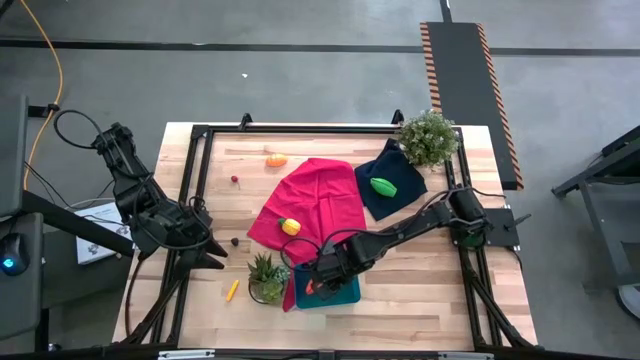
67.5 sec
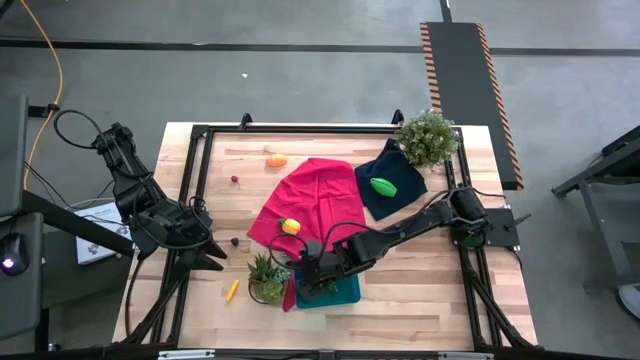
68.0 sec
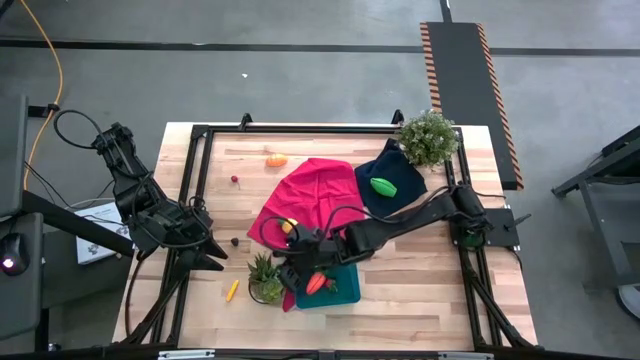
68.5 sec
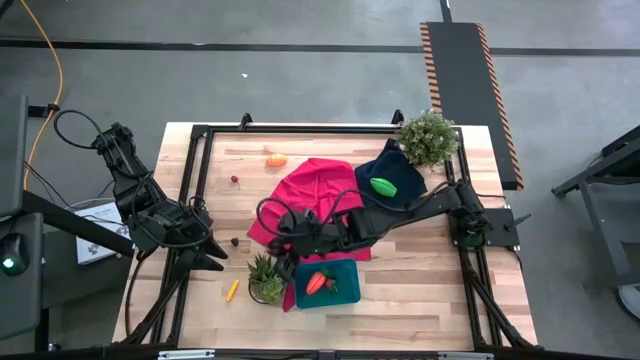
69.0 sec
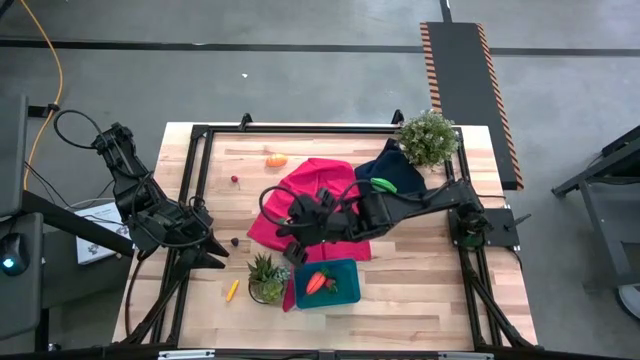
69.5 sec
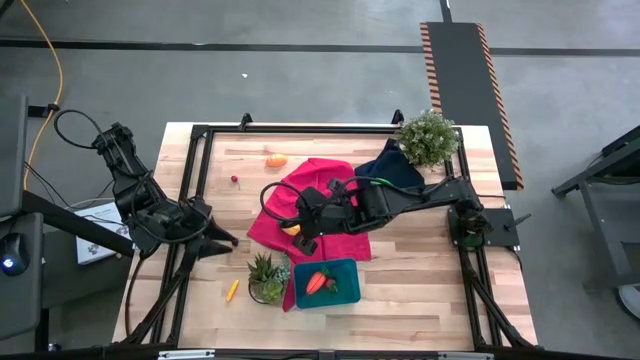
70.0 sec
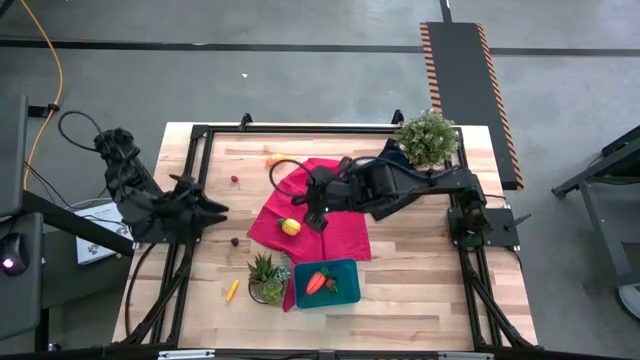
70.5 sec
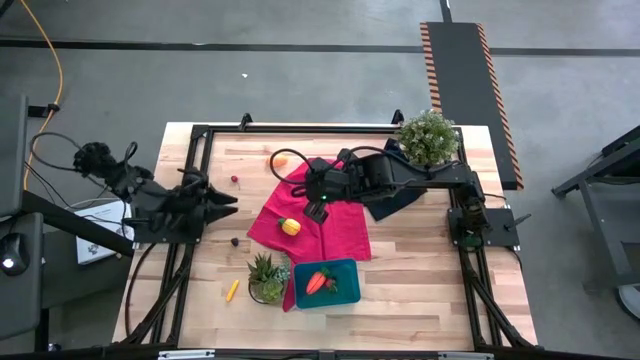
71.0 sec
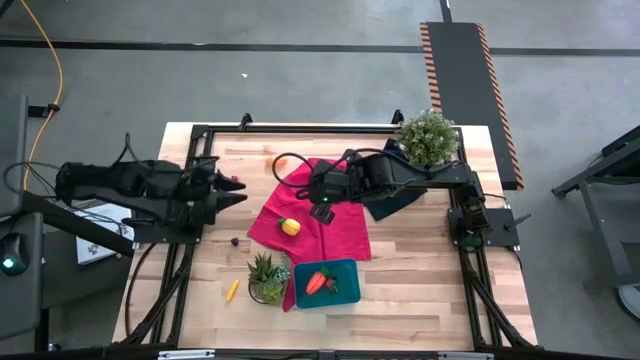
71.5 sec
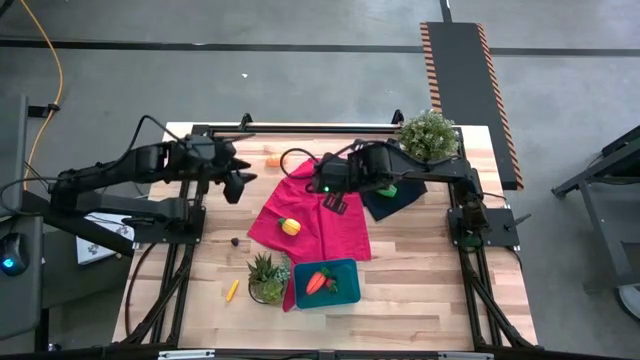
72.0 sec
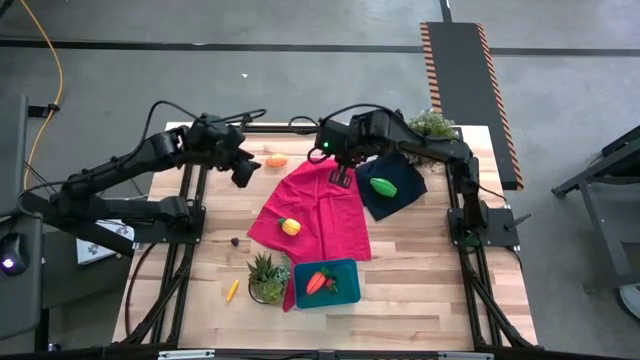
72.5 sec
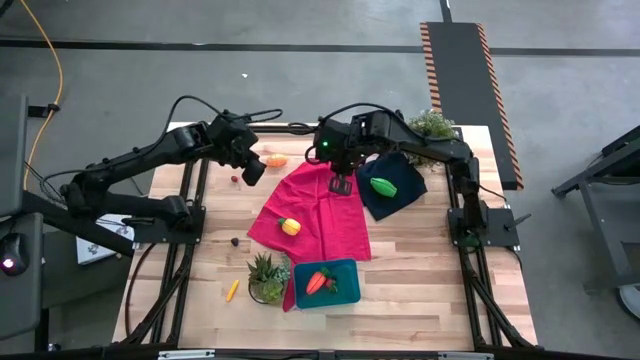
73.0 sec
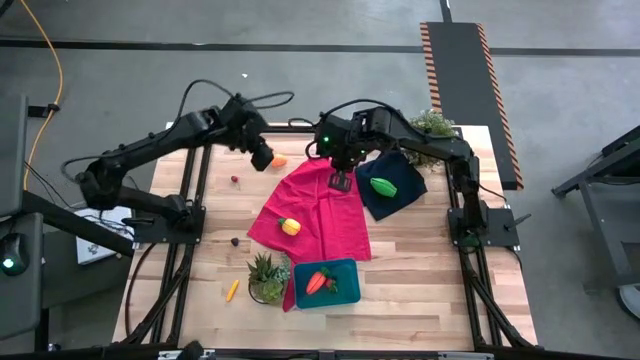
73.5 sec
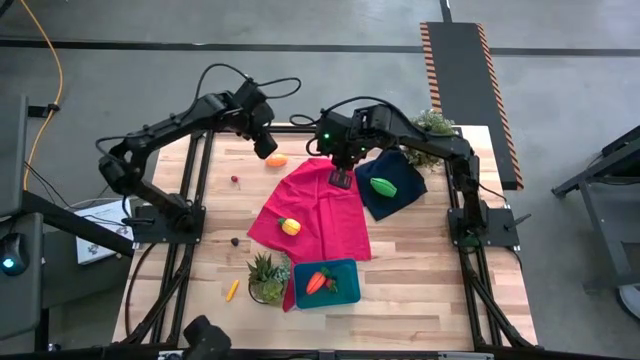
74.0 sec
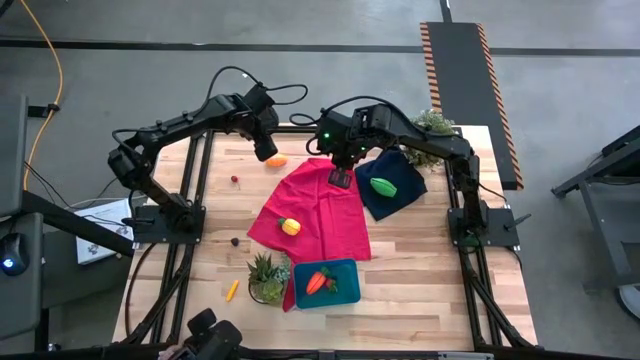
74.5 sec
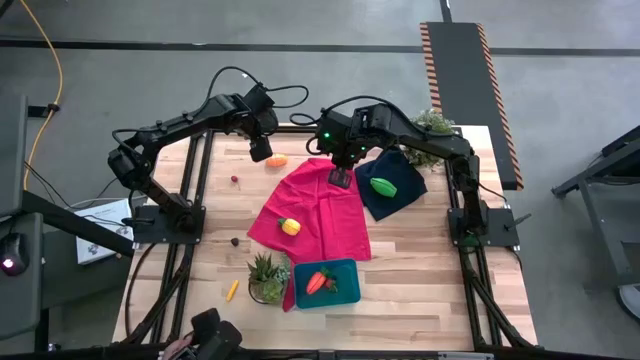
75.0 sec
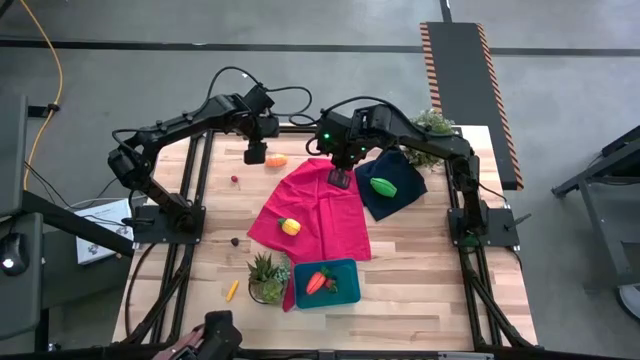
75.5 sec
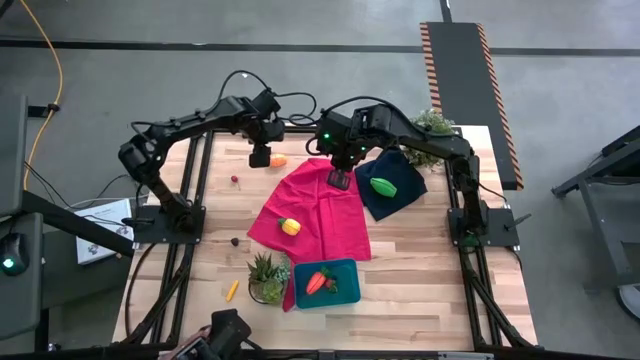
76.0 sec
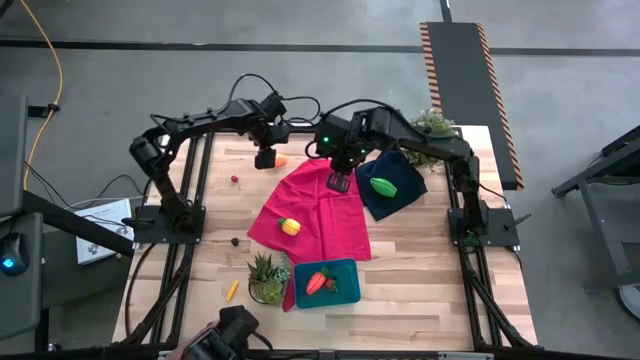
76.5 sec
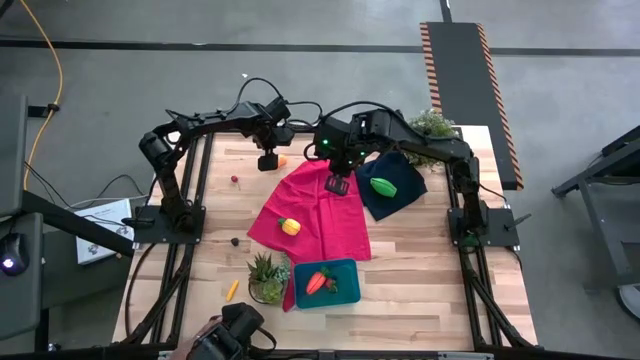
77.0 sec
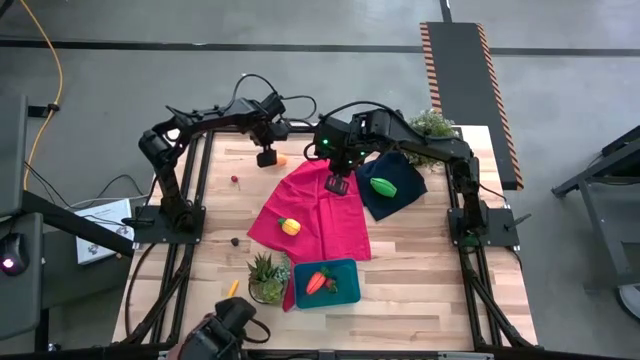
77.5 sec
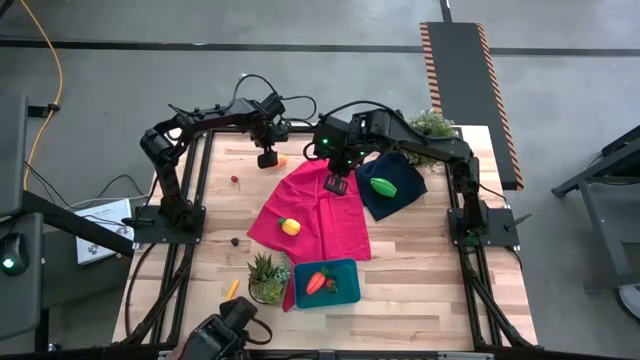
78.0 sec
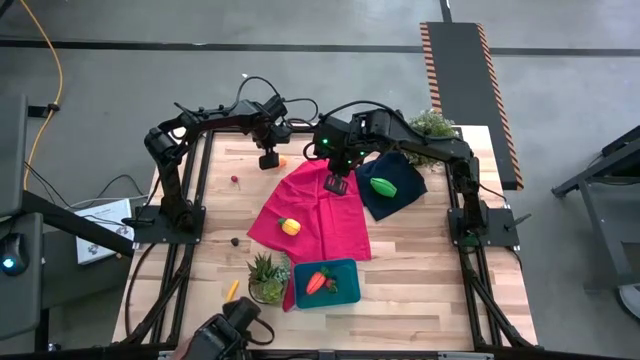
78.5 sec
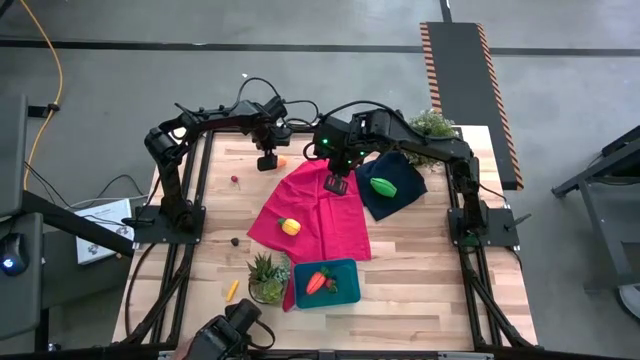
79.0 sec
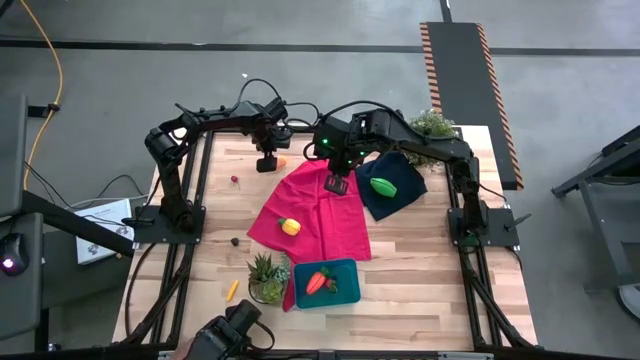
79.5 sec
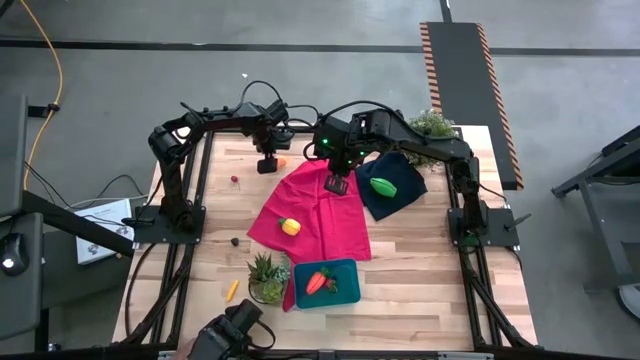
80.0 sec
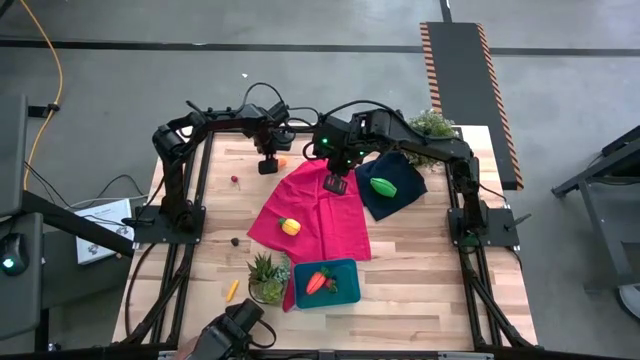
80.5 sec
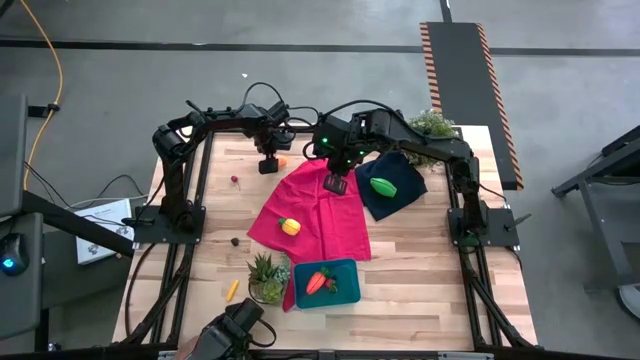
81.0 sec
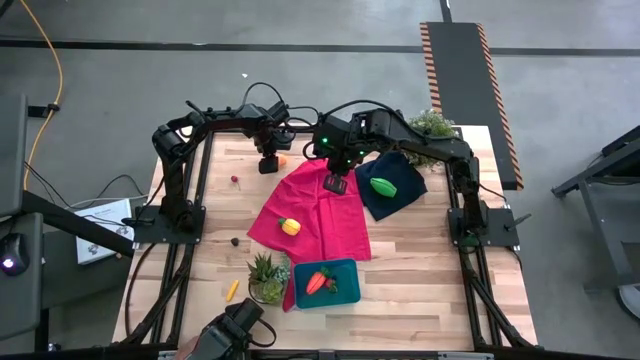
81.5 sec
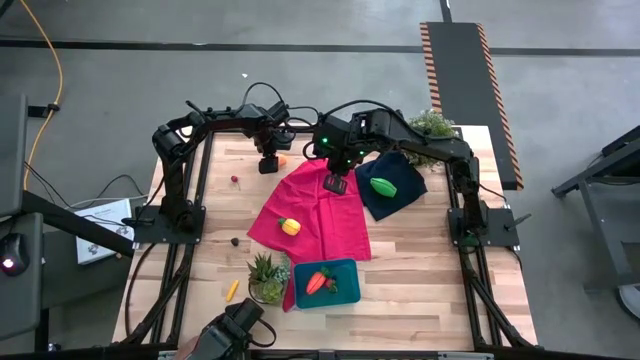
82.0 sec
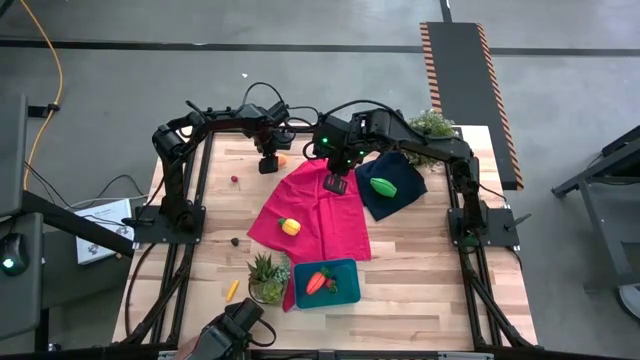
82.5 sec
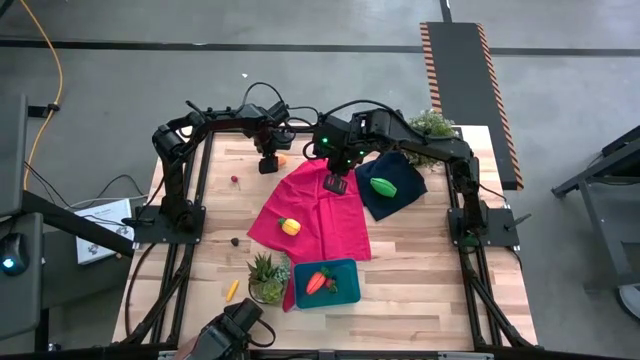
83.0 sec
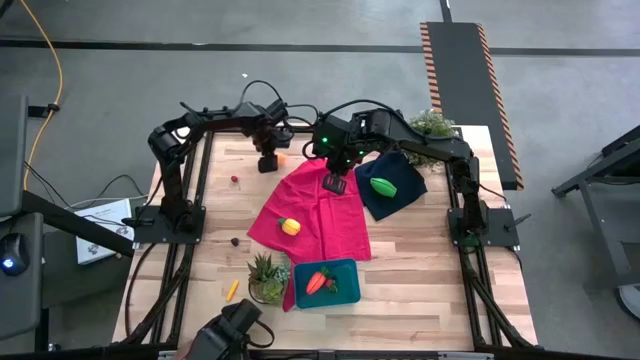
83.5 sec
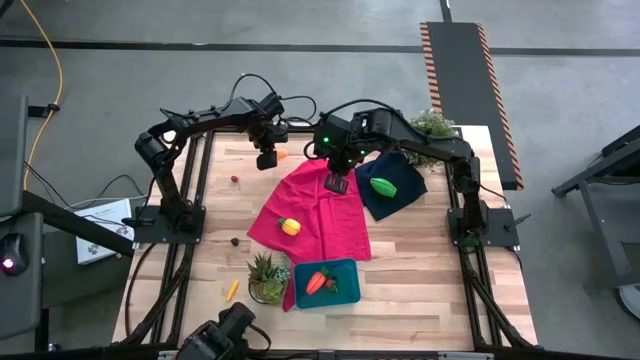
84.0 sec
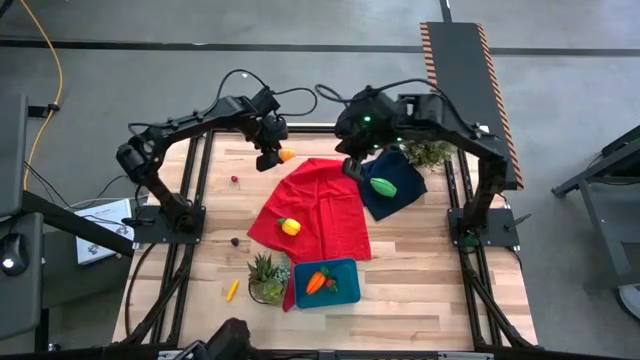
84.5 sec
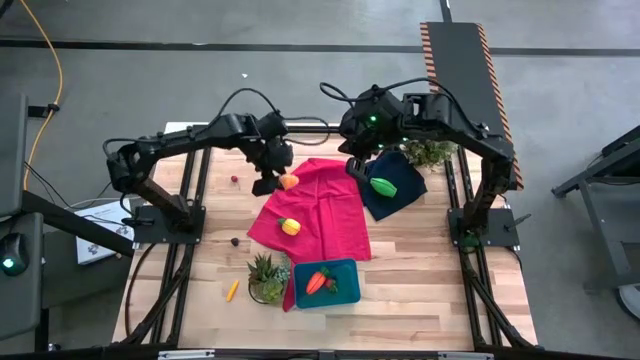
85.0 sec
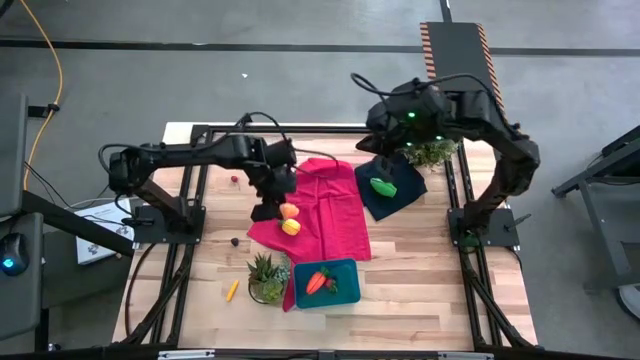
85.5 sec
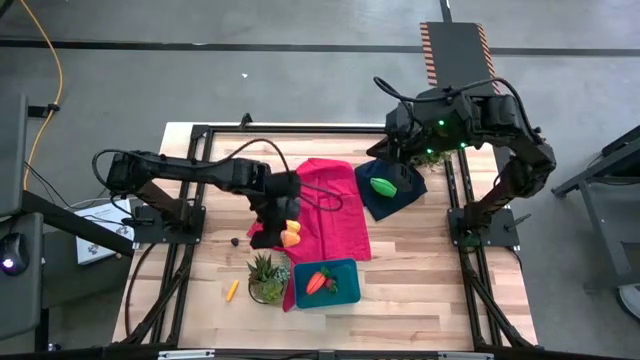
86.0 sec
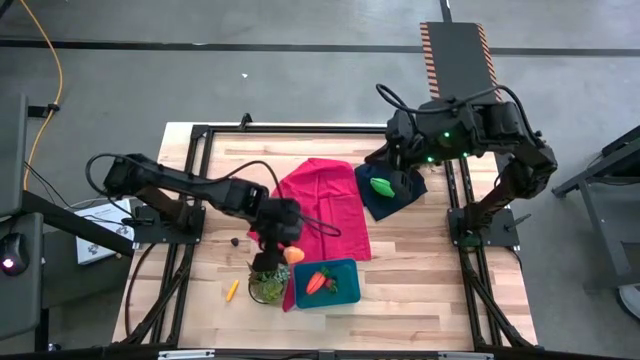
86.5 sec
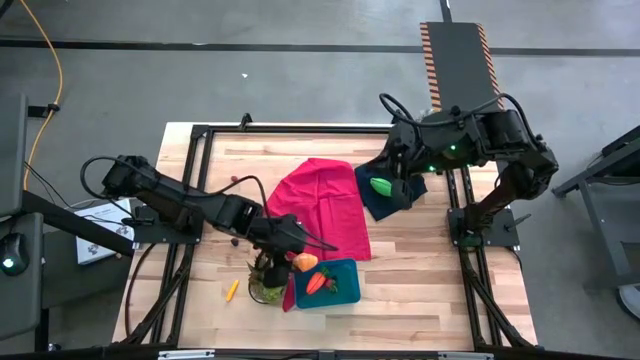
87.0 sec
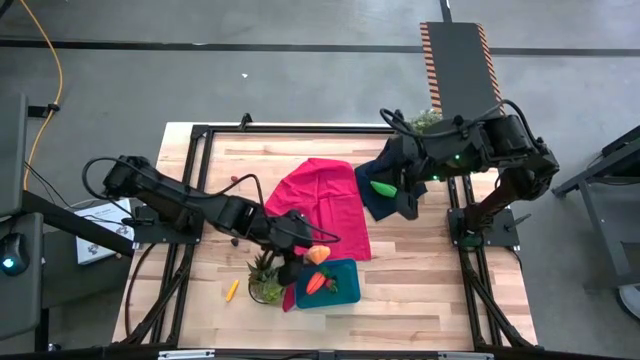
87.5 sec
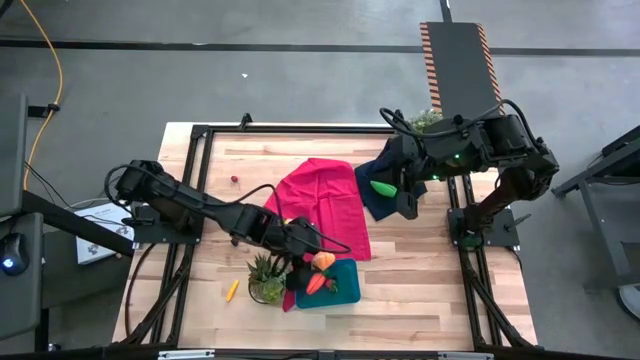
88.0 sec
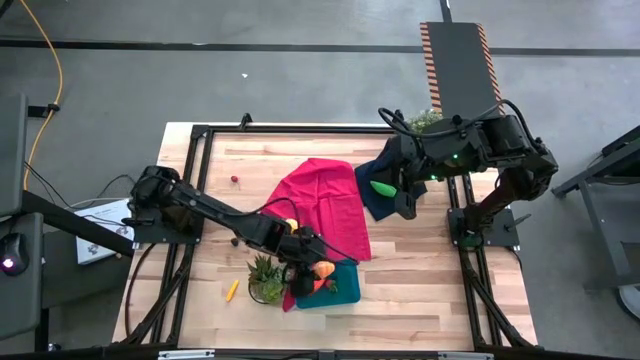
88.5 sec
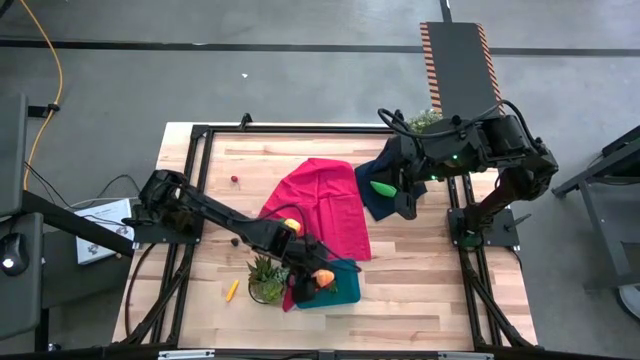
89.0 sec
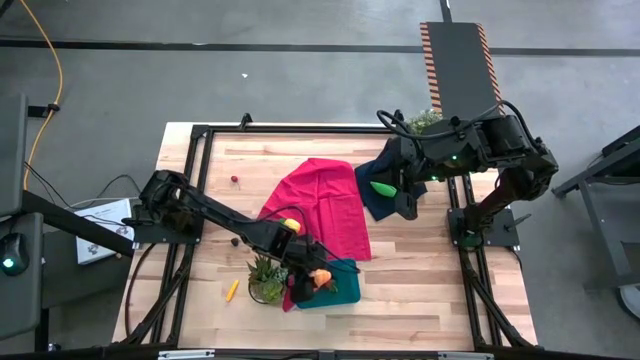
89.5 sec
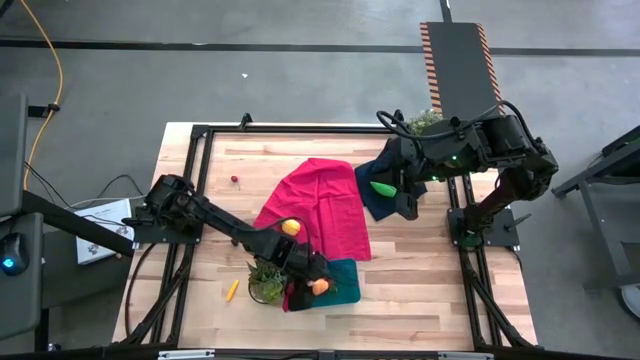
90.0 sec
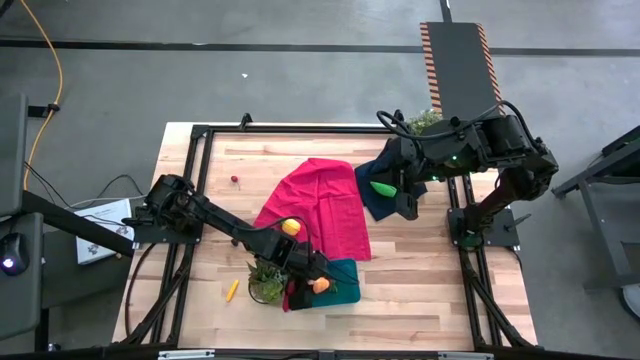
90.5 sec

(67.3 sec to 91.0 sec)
Task: Pick and placing Produce into tupperware
Put the yellow croissant into the blue bin
